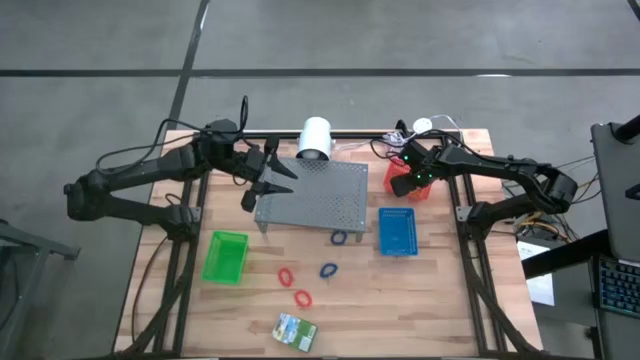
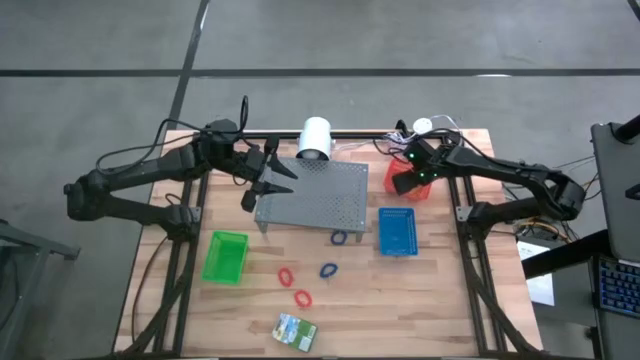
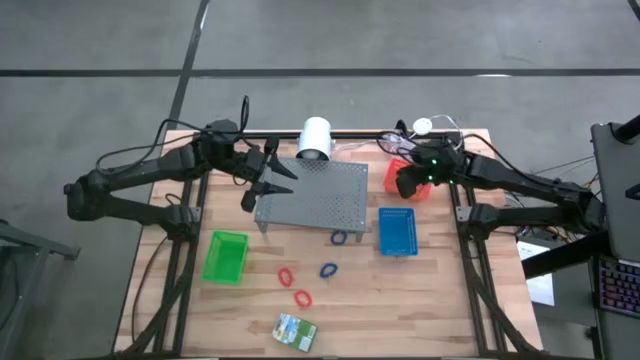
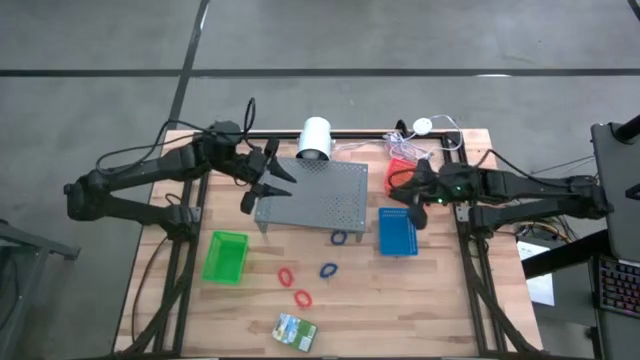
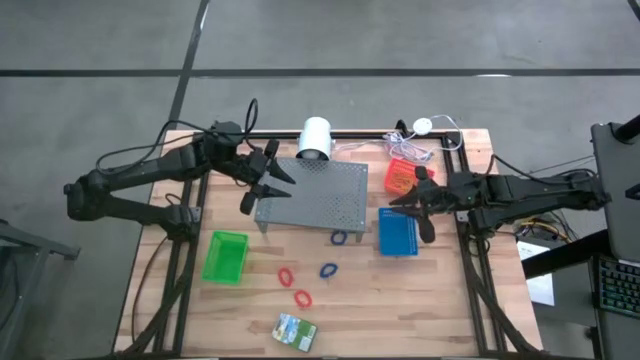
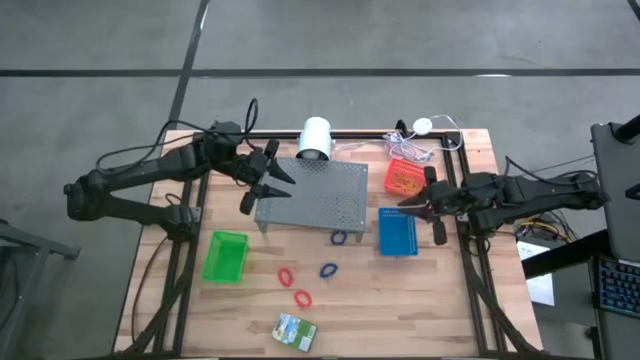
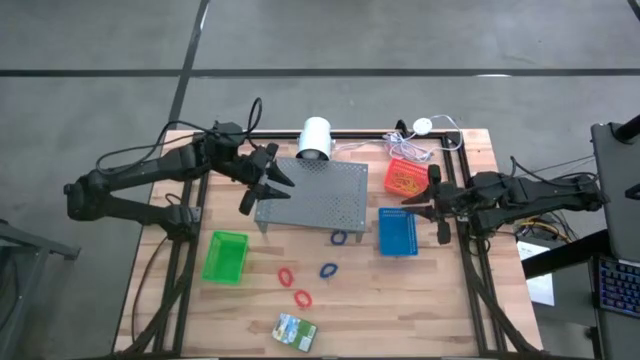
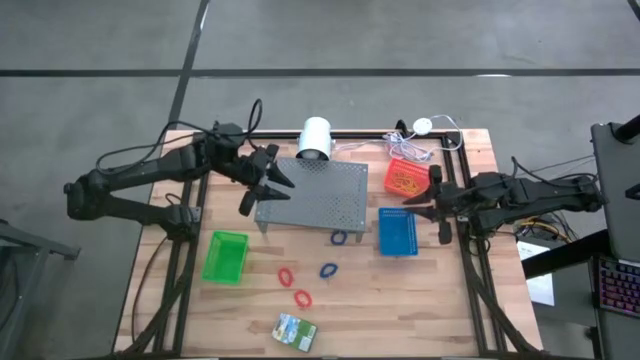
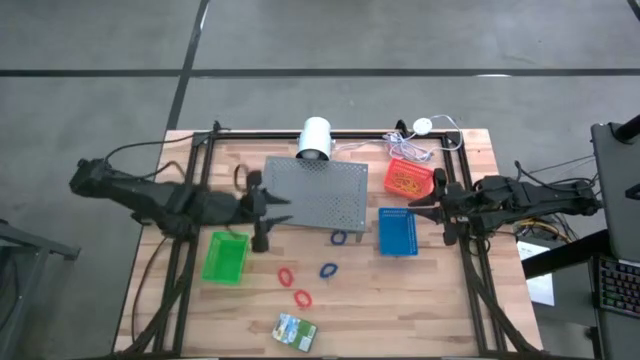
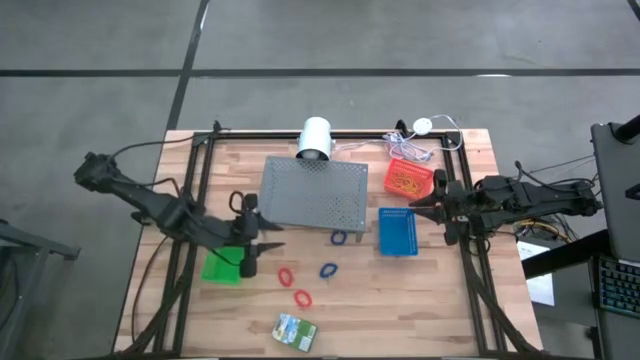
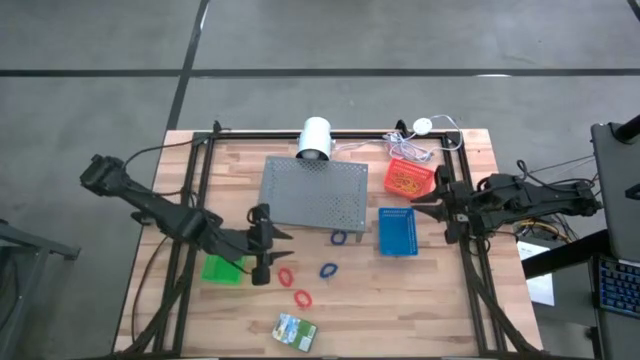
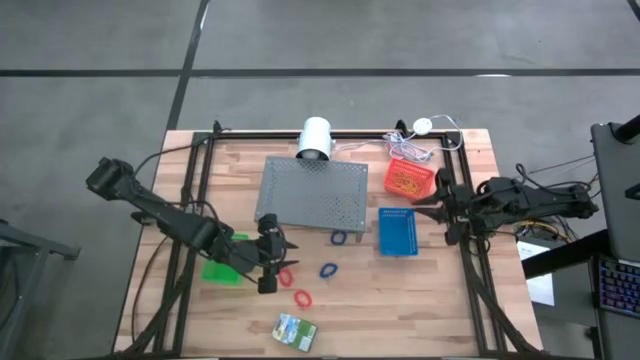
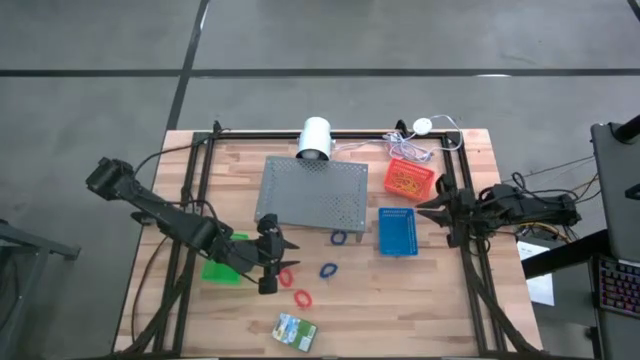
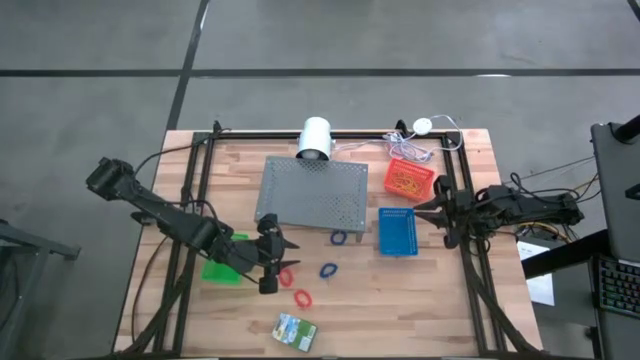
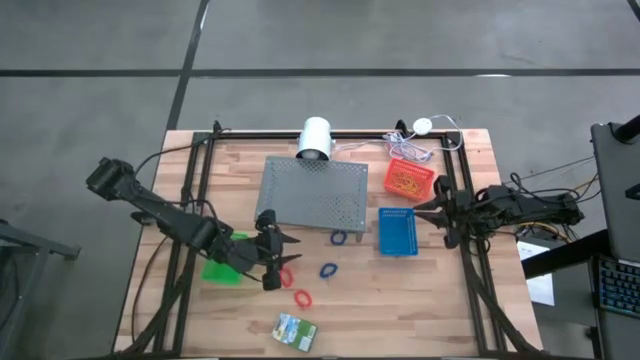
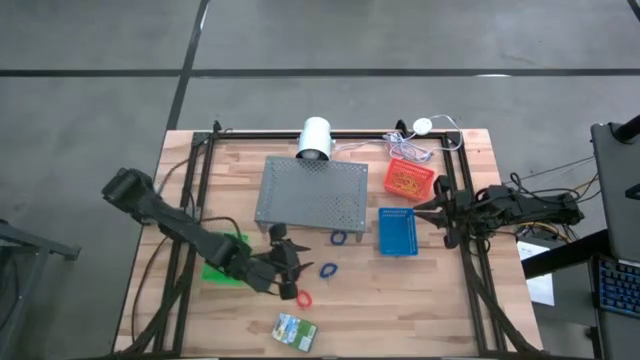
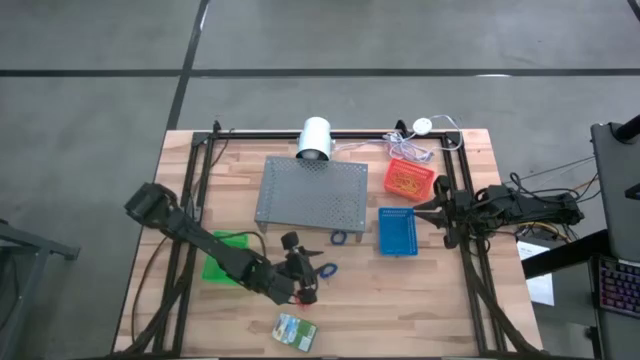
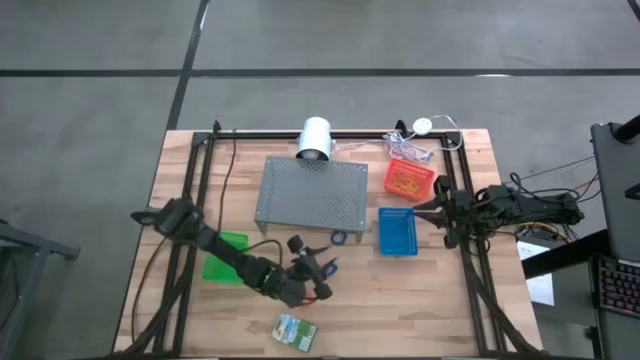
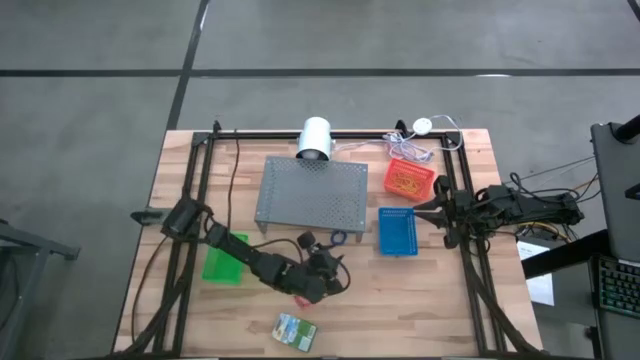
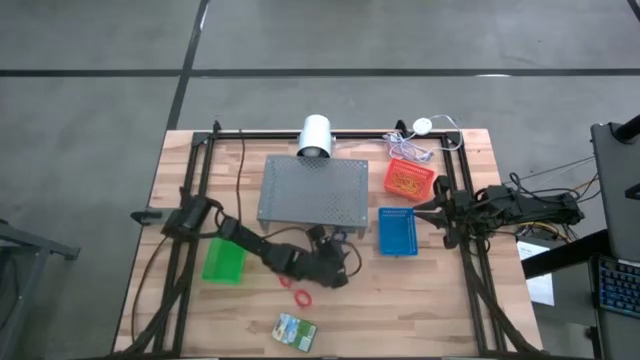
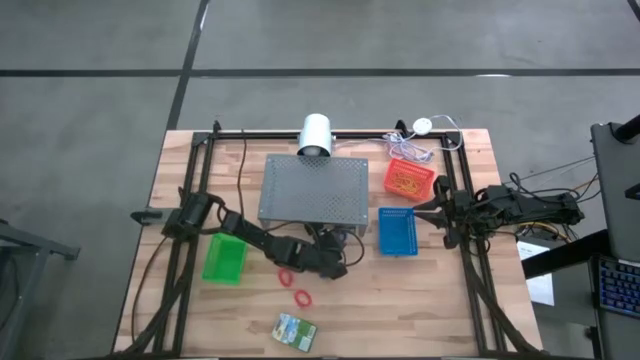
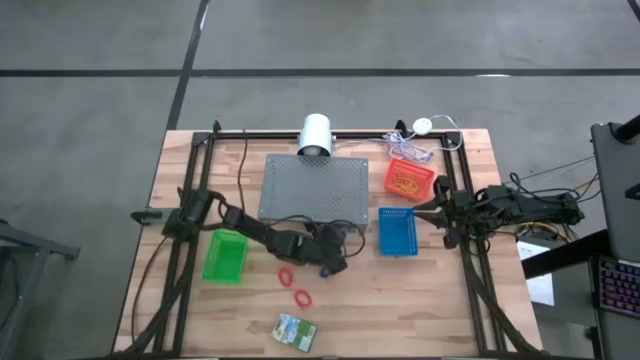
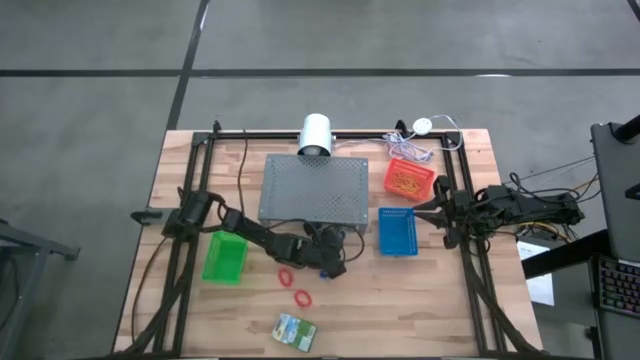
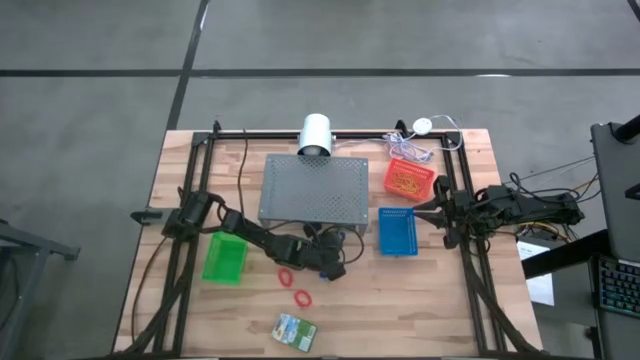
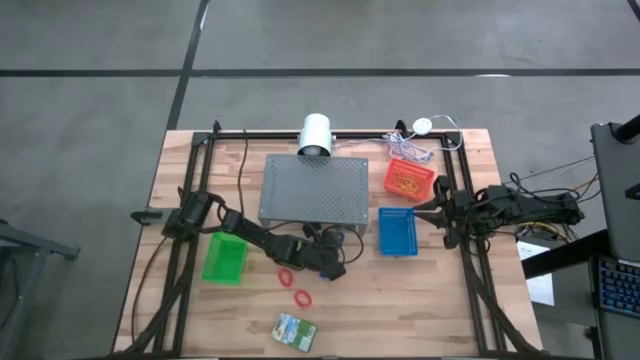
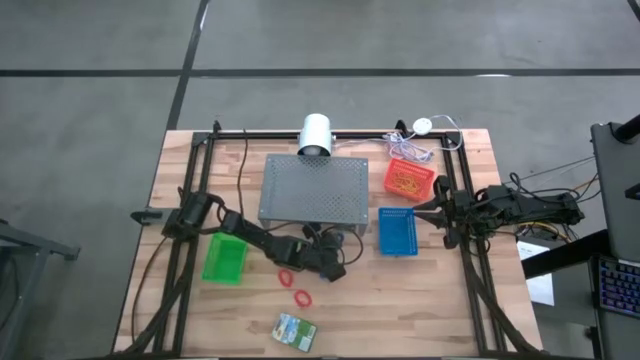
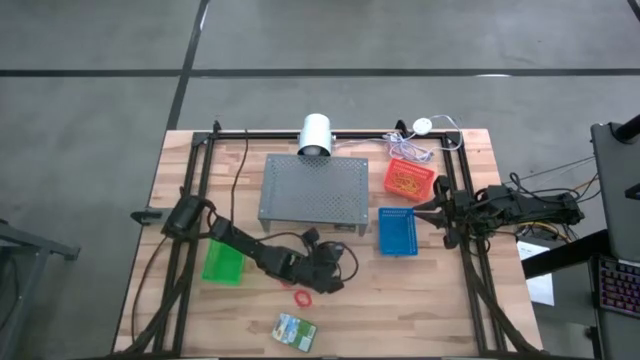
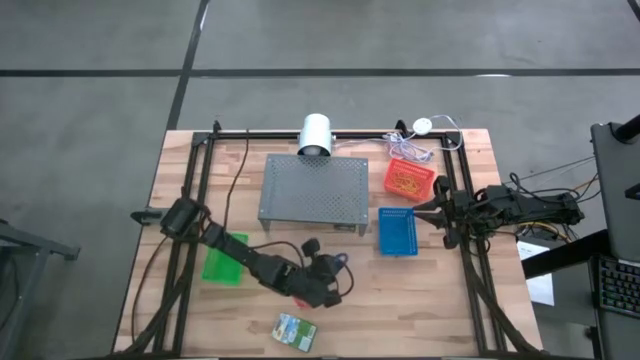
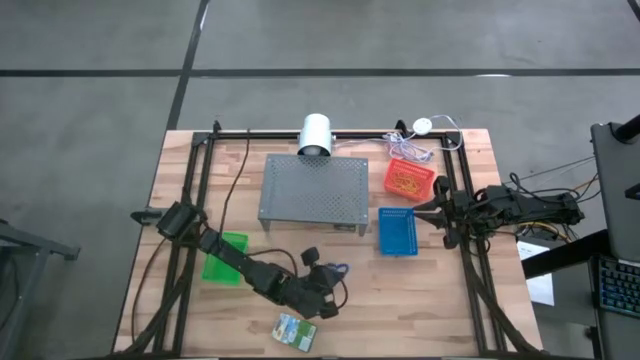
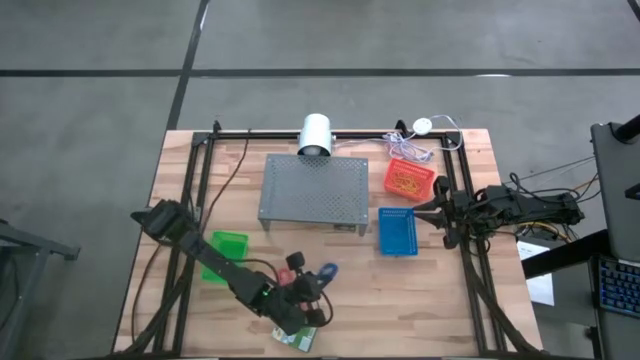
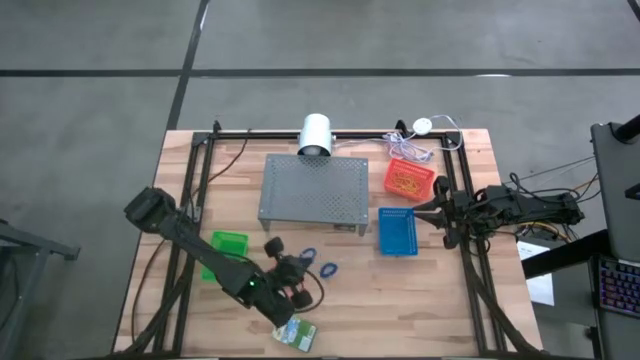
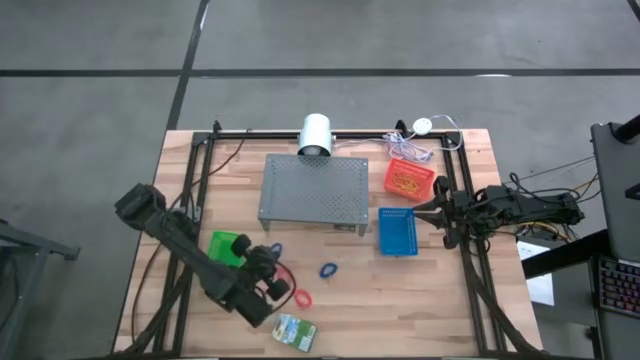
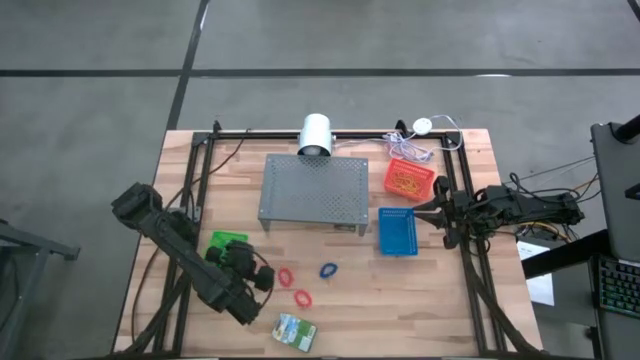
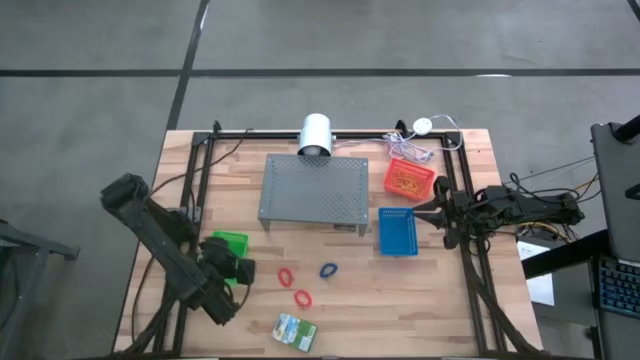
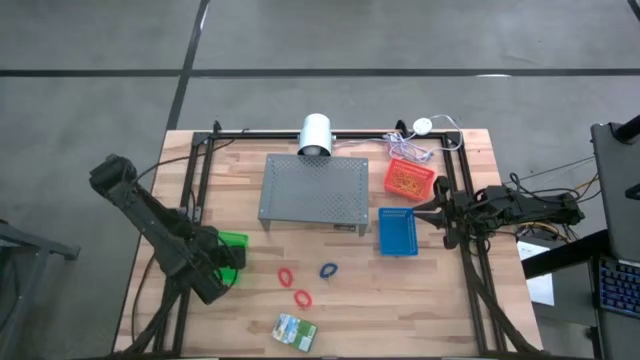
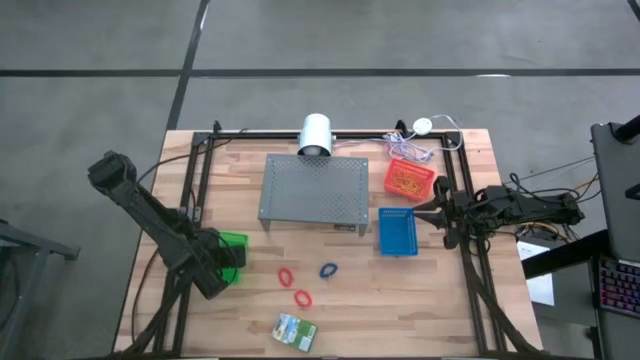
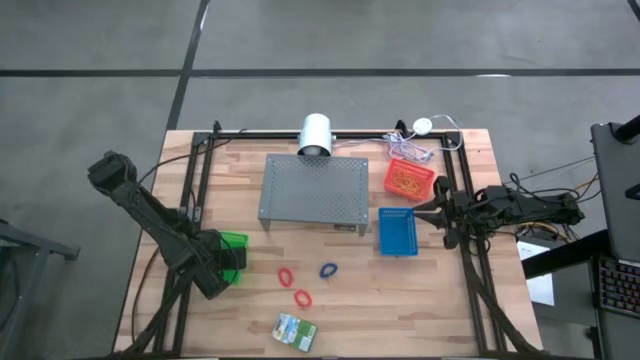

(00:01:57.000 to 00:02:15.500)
Task: Pick & Place Office Desk Supplies
Put the top blue spring keychain into the green bin

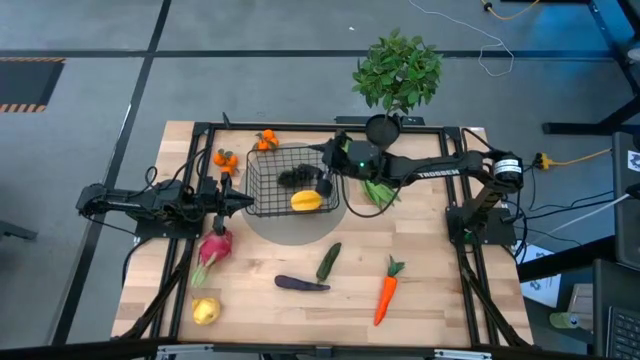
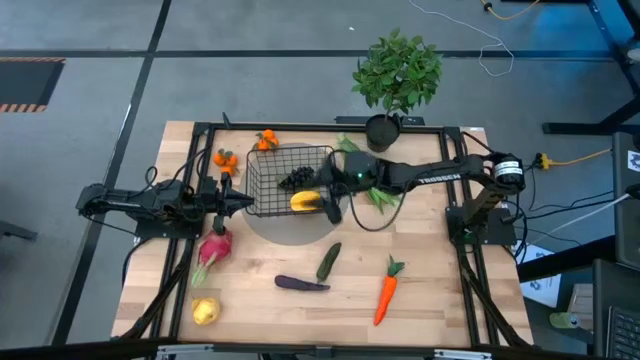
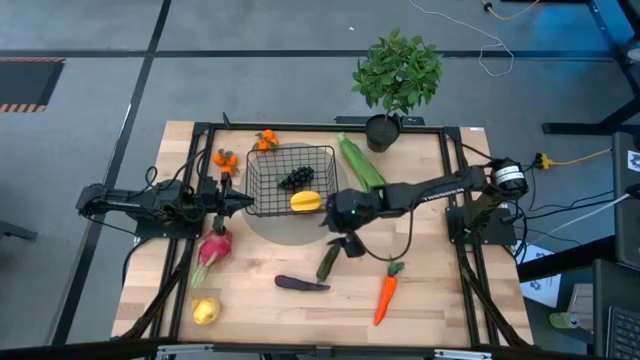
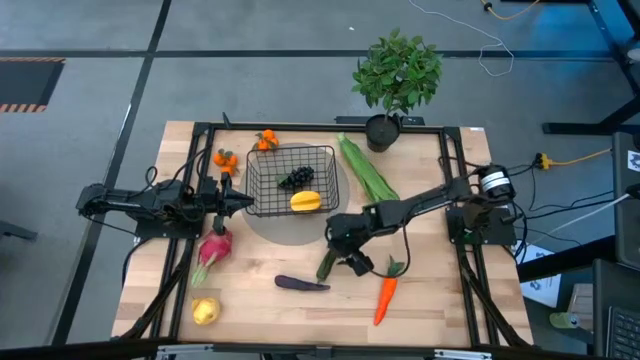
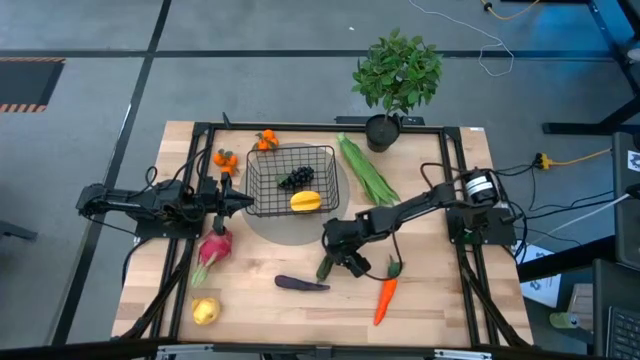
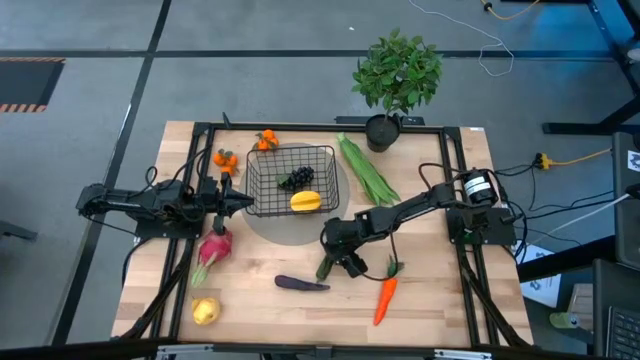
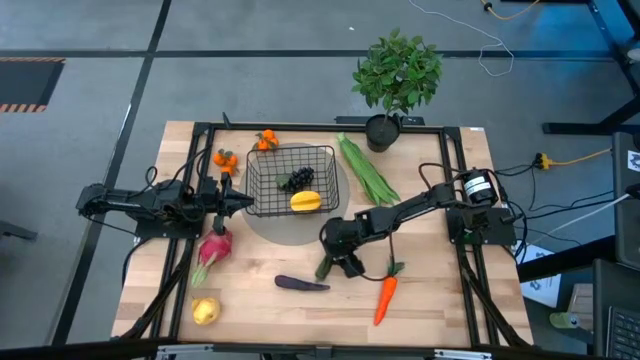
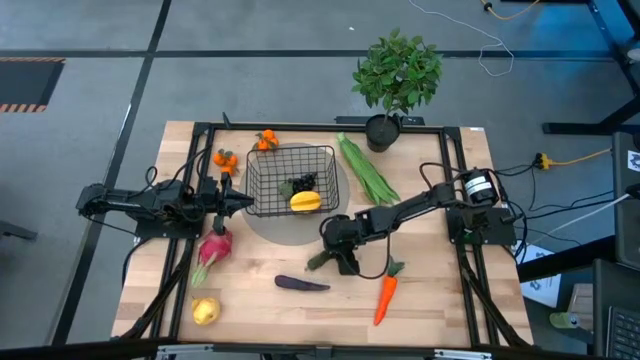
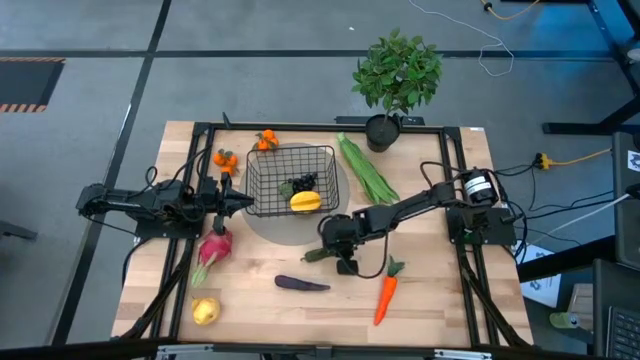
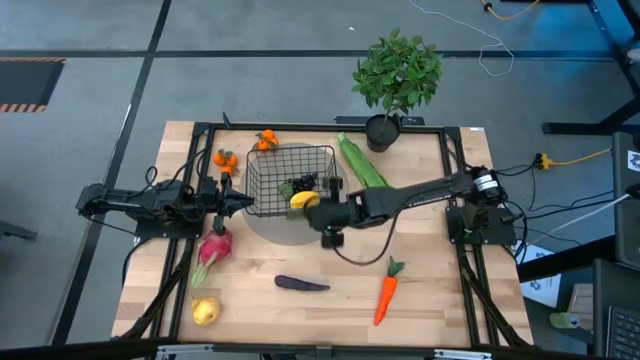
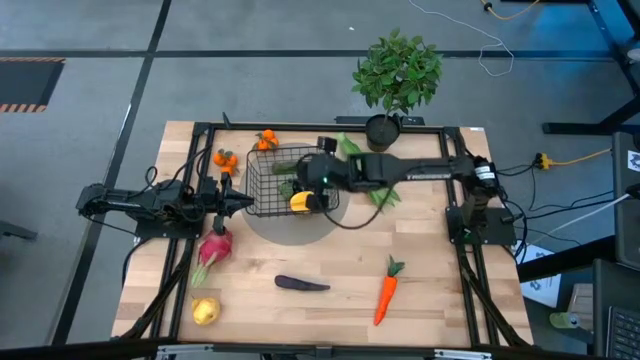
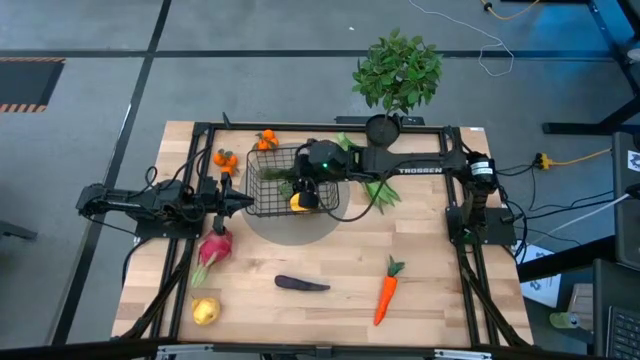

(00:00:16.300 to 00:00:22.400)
Task: Build produce basket
Put the green chili pepper into the black wire basket
